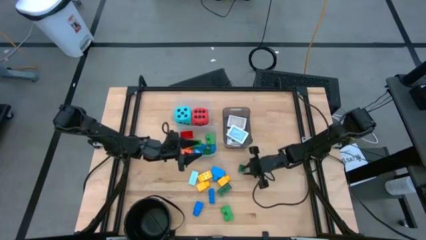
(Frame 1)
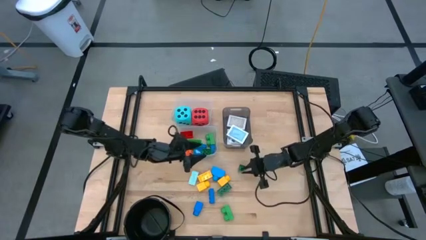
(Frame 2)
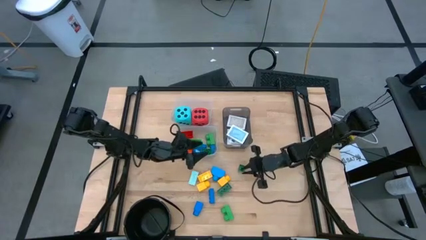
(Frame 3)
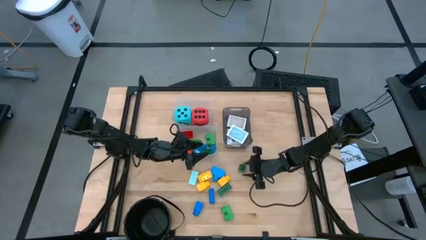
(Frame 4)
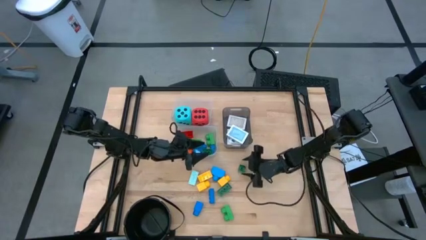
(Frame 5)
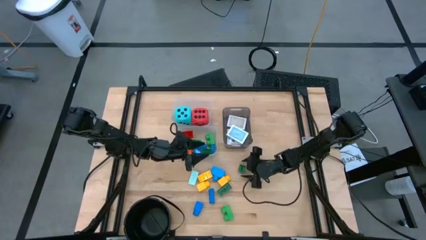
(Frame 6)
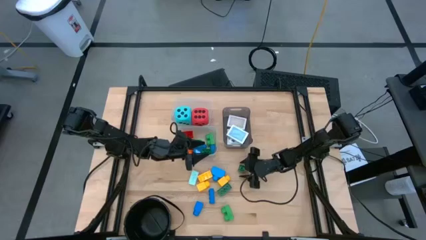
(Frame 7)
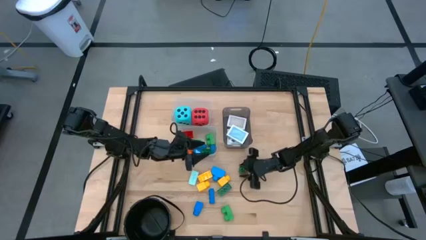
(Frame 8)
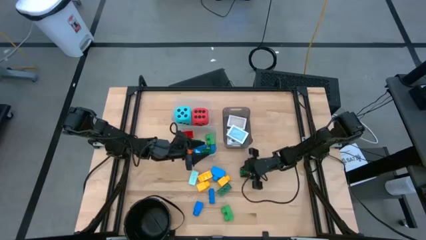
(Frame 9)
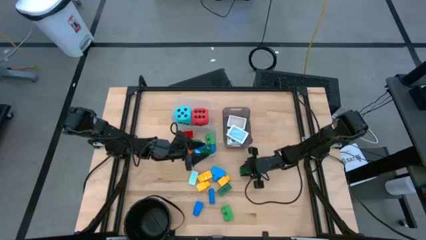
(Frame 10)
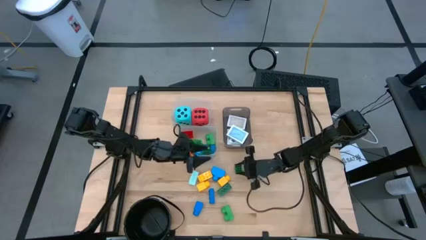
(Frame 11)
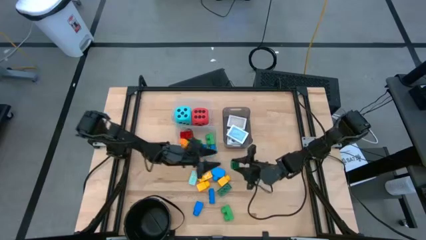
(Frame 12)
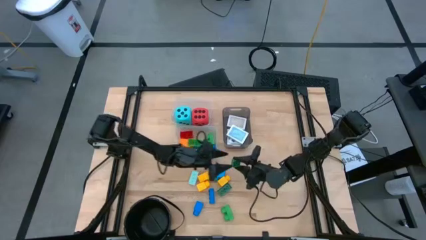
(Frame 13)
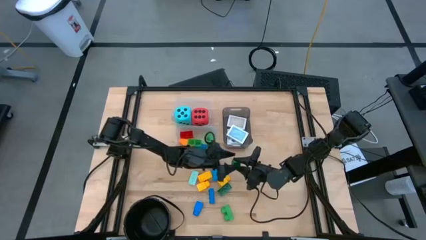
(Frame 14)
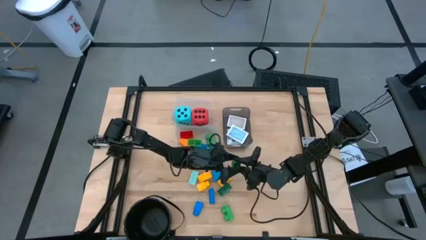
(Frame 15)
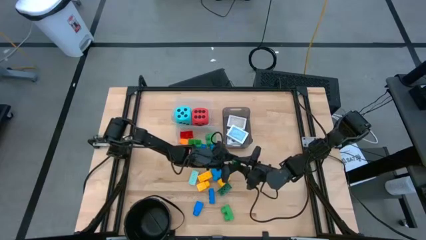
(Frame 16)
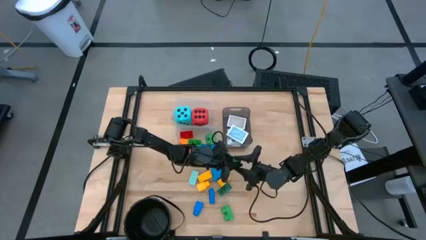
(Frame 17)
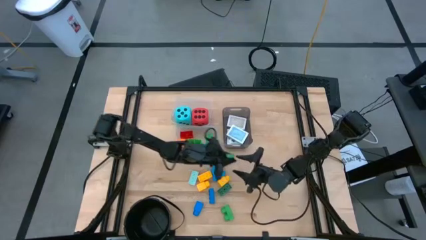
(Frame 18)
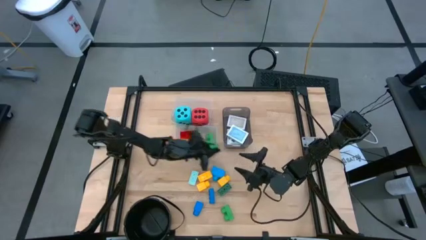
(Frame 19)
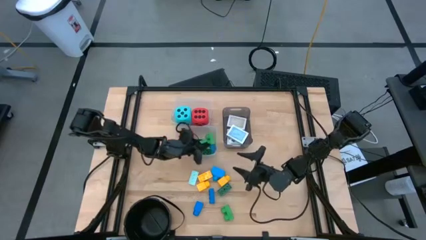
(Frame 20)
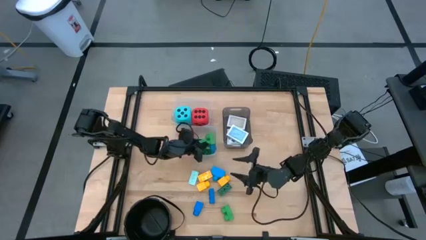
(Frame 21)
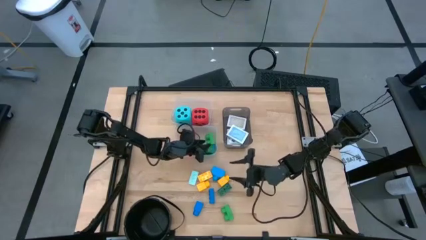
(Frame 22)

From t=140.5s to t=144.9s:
Task: Pick & Place Toys
Put the green game piece into the bottom transparent bin

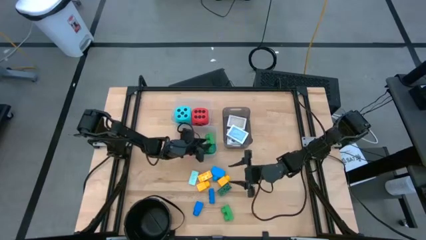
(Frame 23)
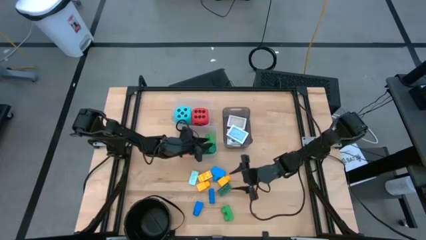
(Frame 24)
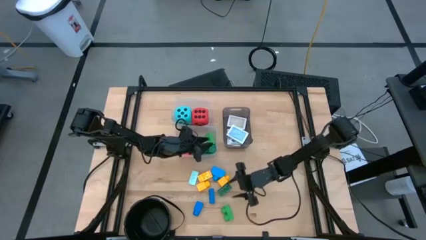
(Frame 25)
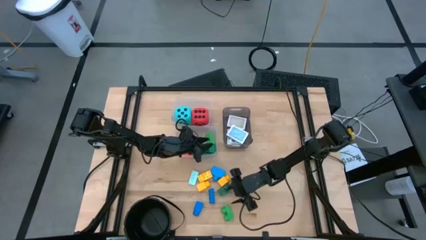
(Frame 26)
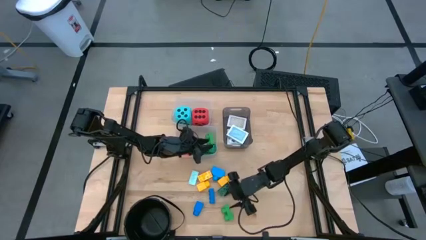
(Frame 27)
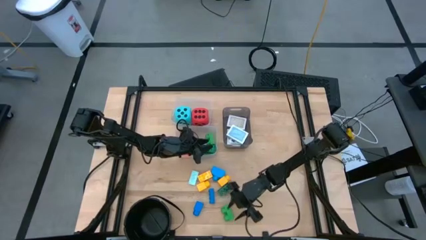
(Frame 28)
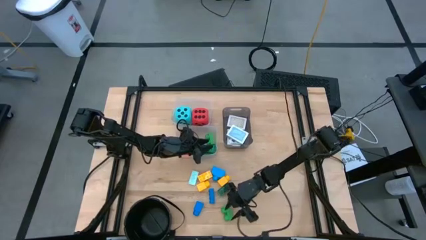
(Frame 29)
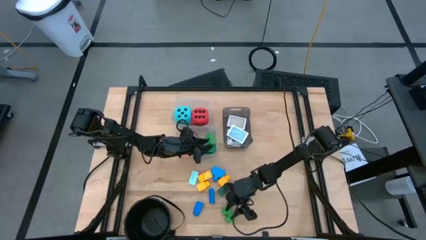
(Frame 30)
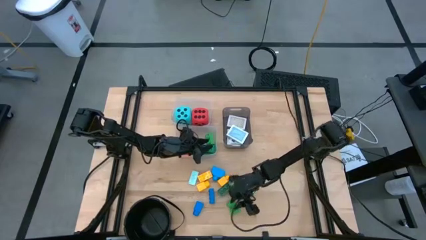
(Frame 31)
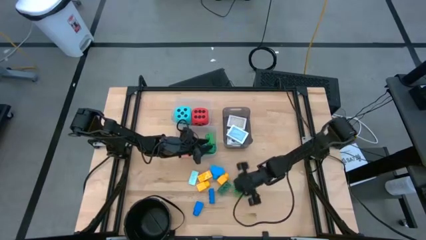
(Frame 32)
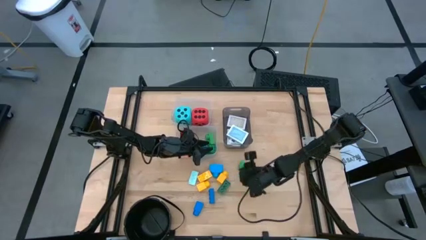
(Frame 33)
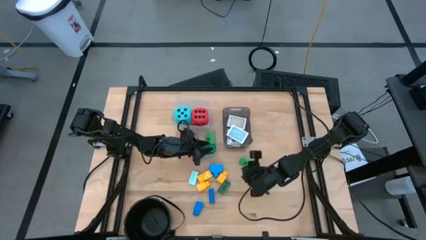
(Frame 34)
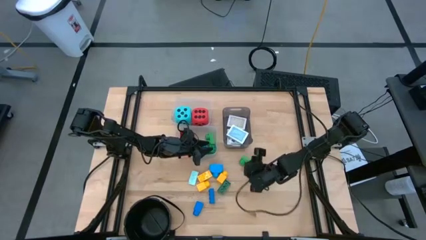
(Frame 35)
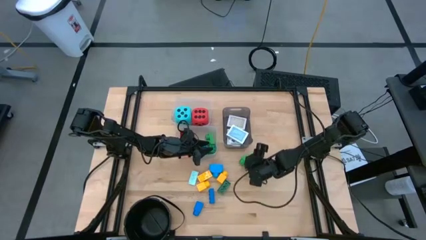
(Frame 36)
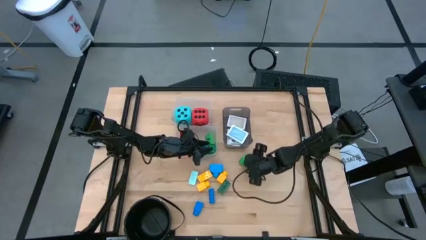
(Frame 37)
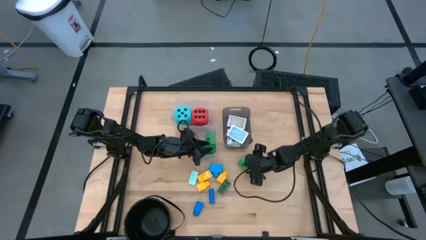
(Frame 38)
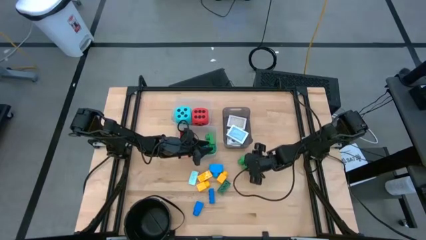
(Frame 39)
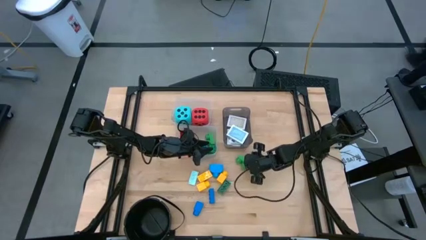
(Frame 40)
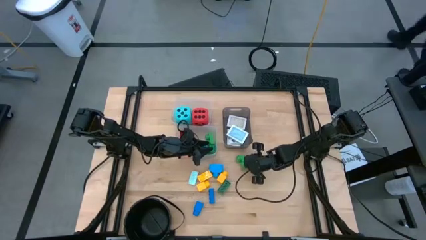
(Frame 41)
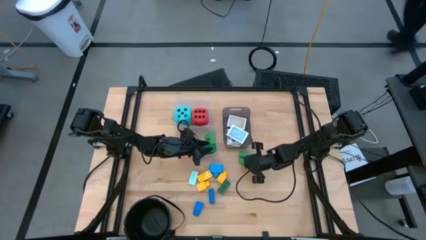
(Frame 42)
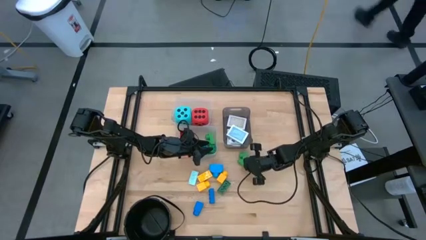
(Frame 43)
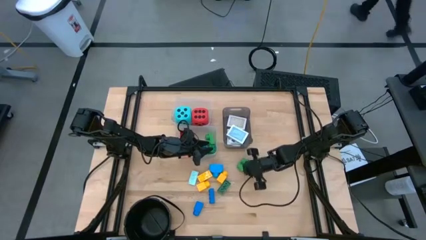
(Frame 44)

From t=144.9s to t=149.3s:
Put the green game piece into the bottom transparent bin

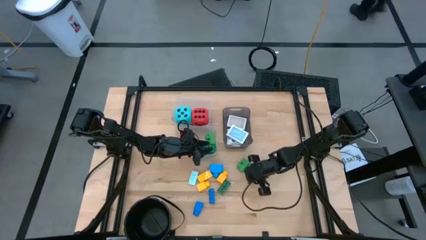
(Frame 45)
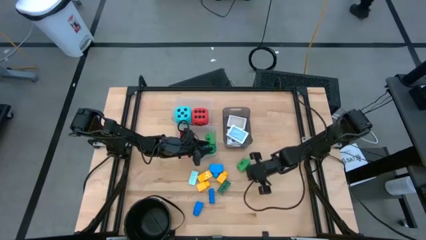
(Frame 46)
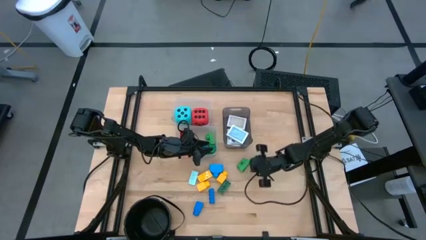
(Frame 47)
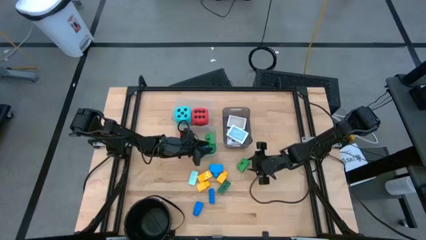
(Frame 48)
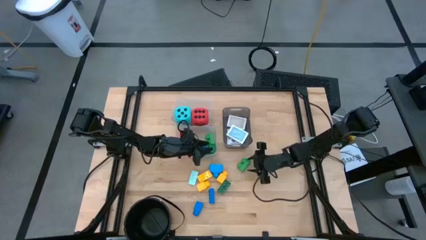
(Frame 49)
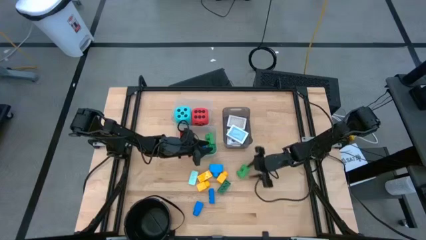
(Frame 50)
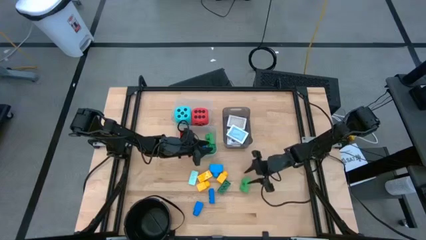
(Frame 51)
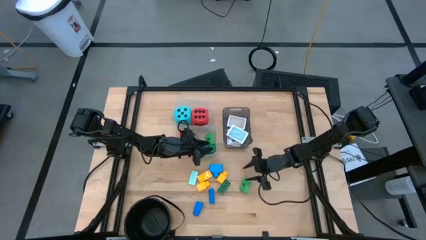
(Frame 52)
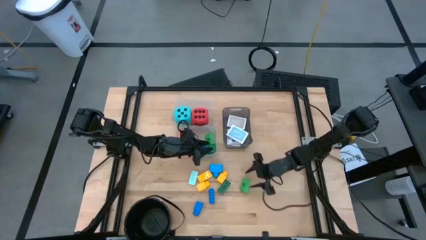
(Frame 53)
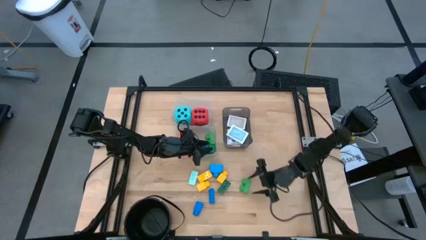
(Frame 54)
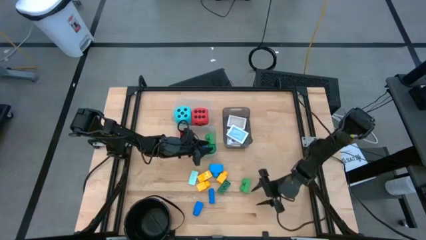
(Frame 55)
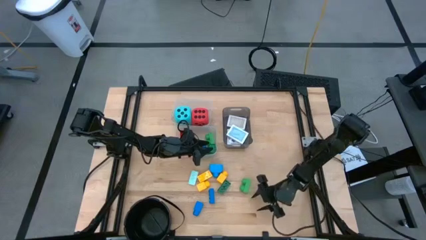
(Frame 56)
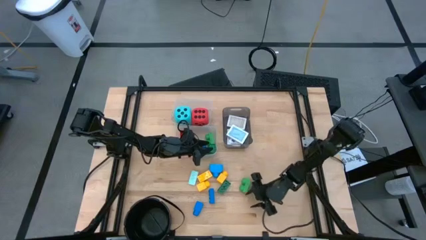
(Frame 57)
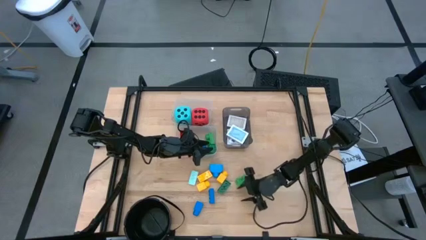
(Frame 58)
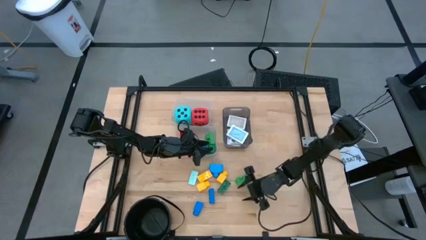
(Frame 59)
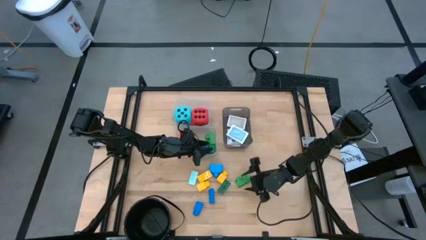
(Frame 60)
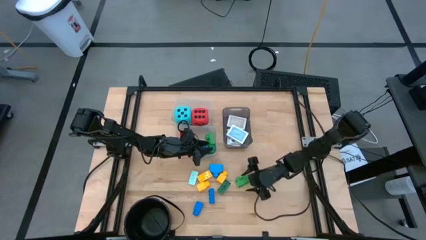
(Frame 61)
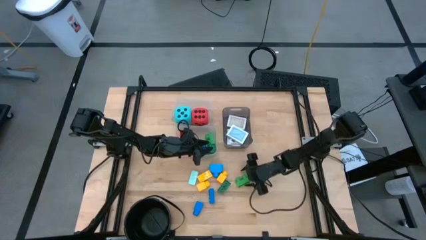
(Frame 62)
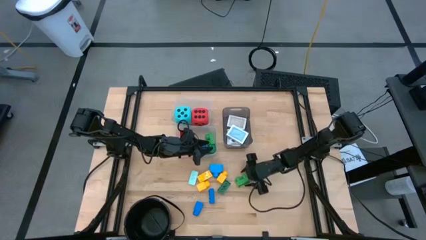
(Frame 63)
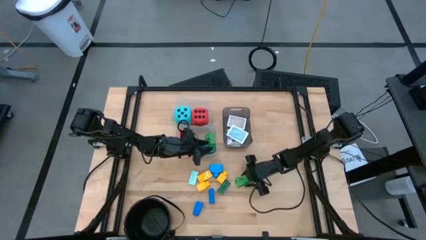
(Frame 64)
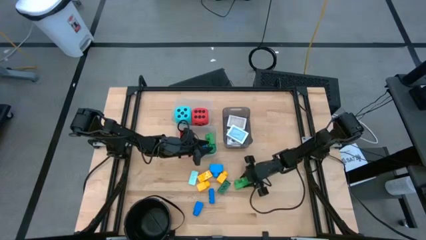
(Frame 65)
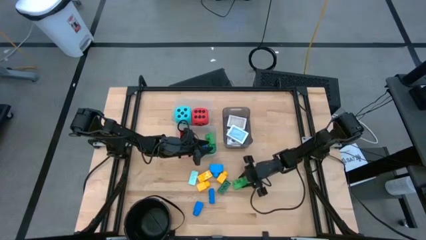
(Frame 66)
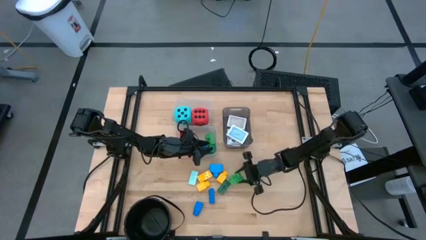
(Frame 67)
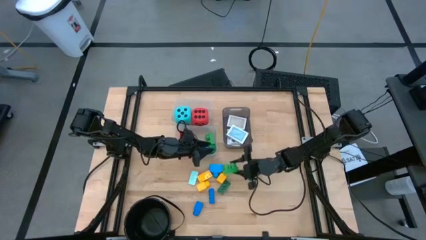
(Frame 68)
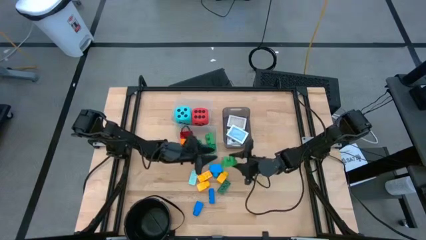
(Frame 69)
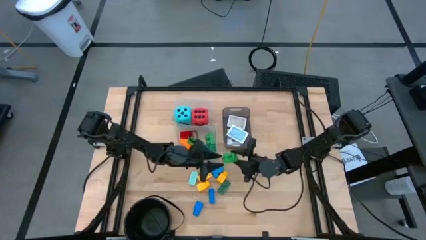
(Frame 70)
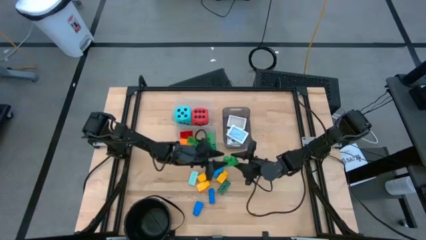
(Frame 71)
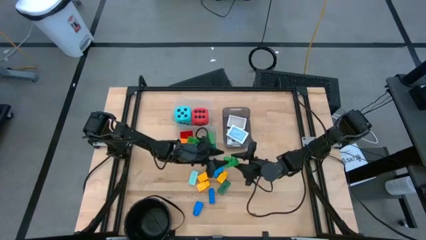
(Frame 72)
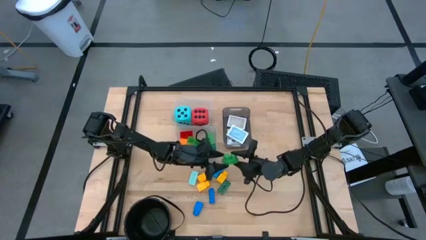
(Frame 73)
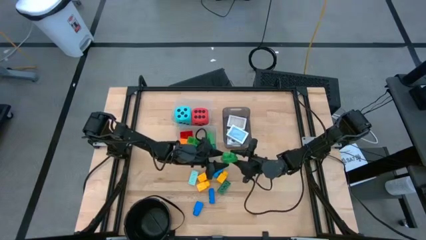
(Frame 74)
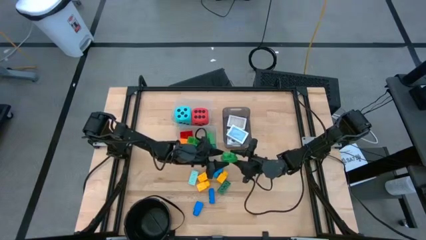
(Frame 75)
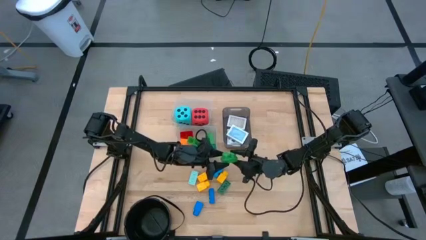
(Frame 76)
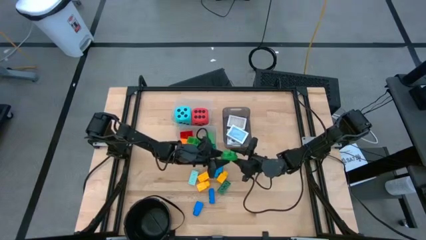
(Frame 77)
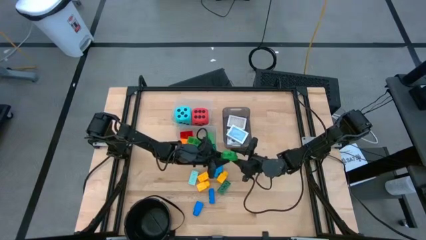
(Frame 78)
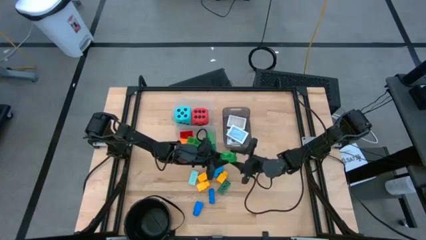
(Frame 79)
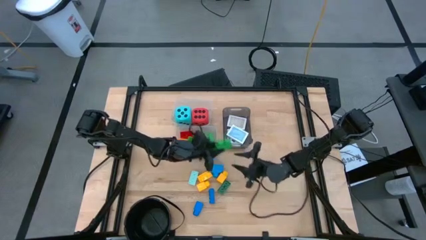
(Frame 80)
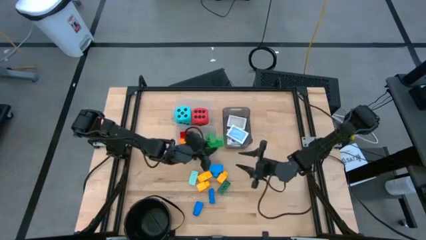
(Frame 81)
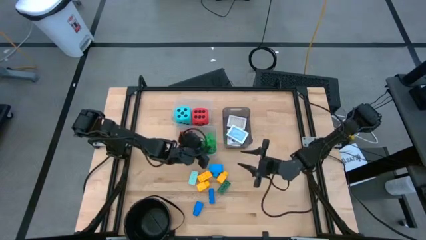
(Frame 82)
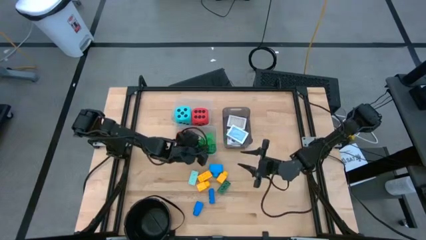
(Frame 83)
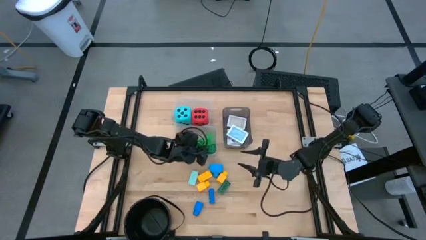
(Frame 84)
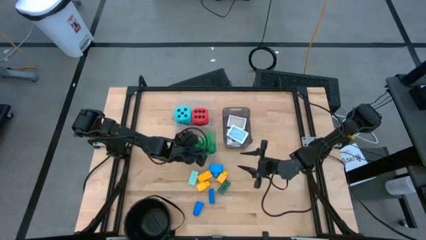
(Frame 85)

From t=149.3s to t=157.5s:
Put the green game piece into the bottom transparent bin

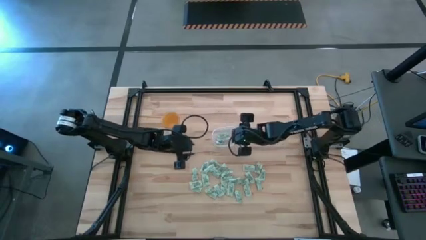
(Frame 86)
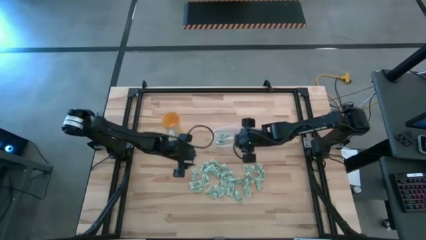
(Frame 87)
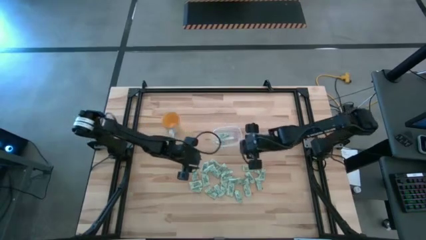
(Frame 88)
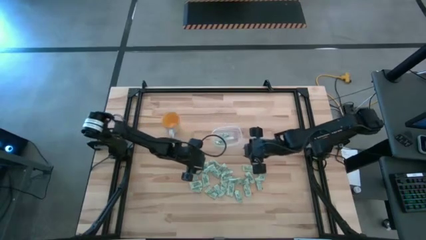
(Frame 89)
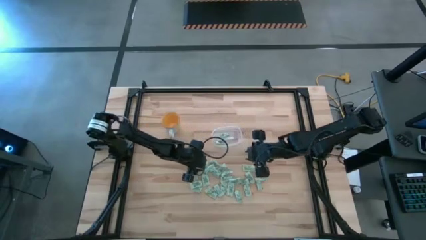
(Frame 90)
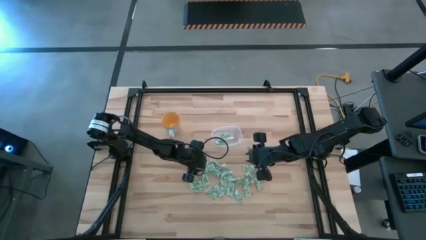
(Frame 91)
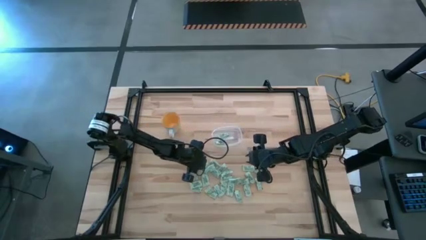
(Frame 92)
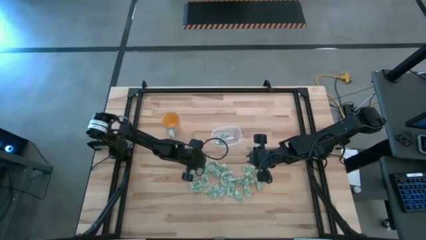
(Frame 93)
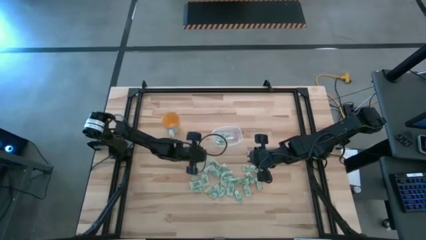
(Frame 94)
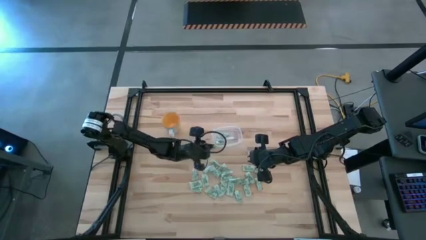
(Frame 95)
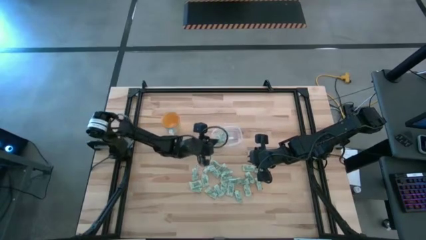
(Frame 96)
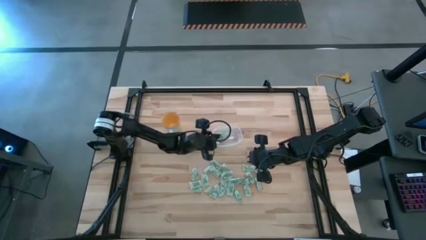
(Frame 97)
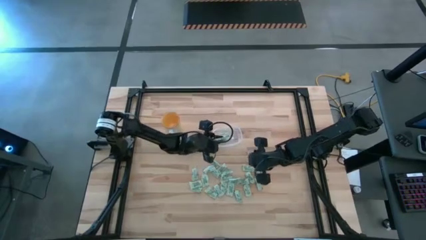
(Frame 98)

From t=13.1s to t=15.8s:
Task: Pick and place Stevia / Truvia into bins
Put the stevia packet into the transparent bin
